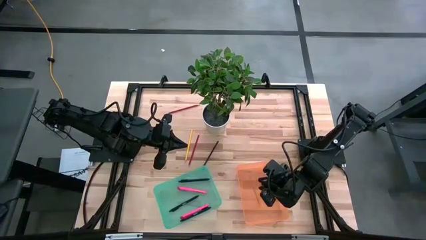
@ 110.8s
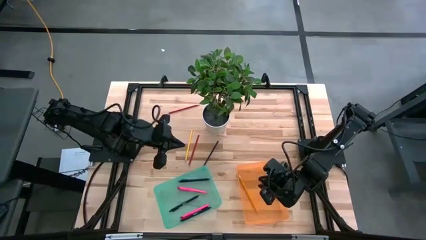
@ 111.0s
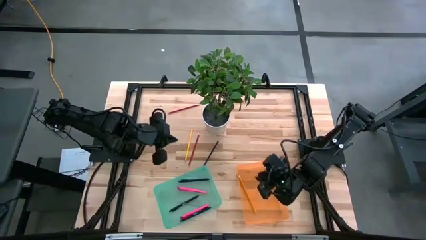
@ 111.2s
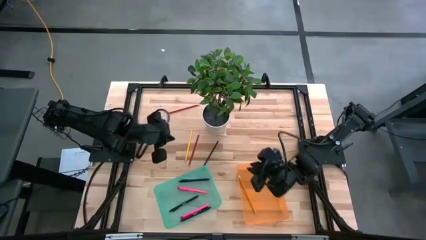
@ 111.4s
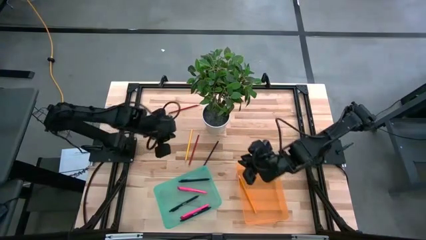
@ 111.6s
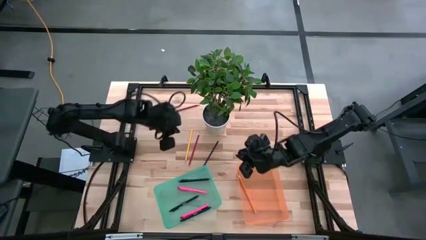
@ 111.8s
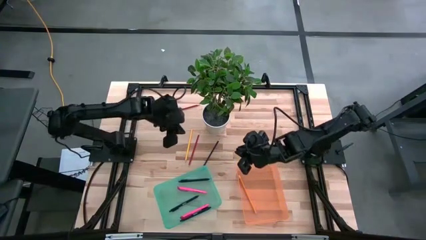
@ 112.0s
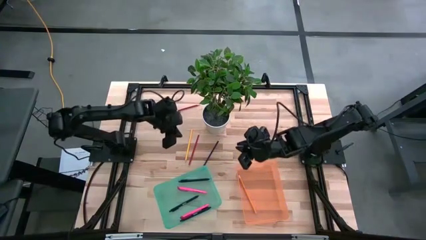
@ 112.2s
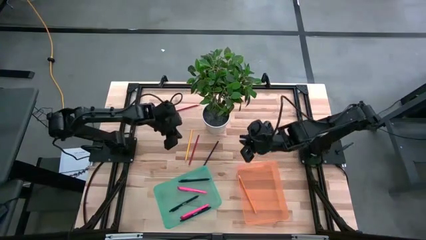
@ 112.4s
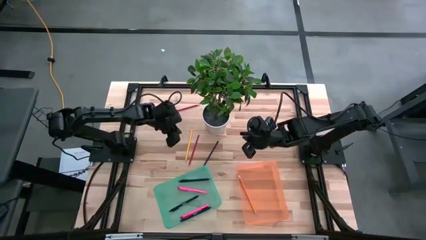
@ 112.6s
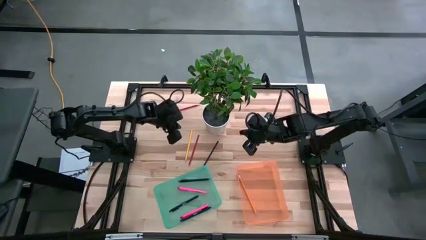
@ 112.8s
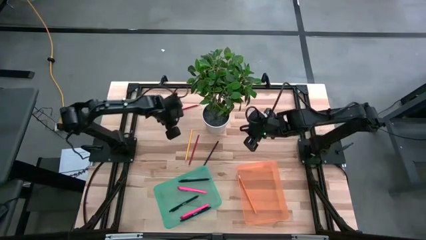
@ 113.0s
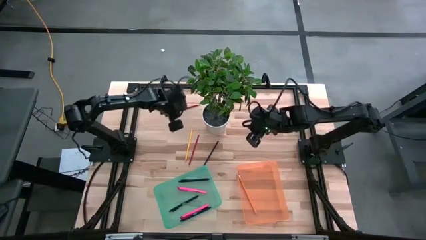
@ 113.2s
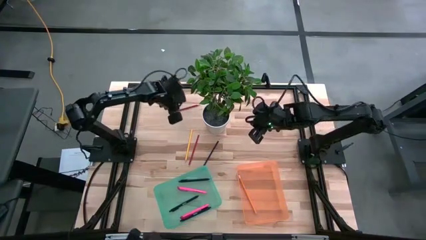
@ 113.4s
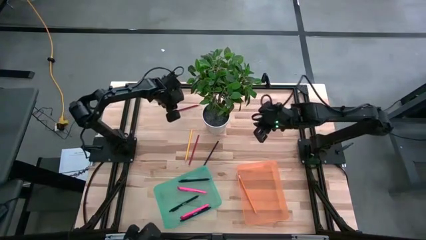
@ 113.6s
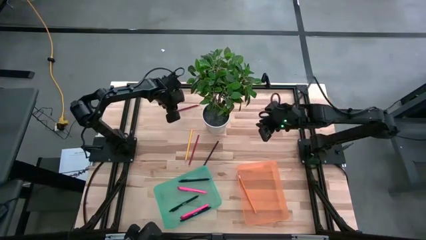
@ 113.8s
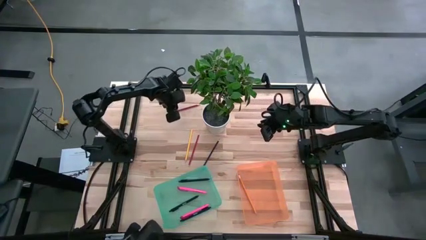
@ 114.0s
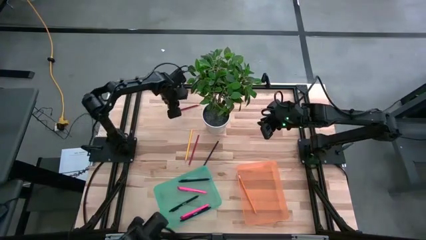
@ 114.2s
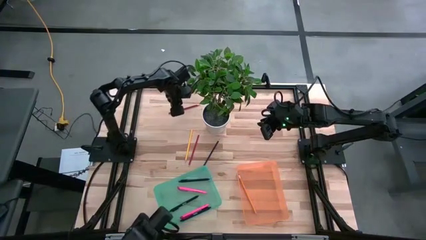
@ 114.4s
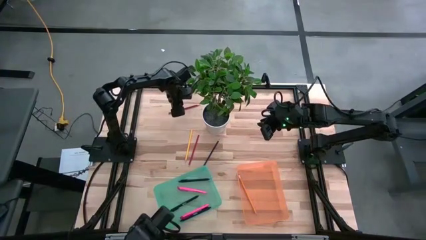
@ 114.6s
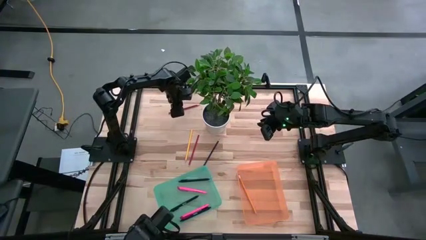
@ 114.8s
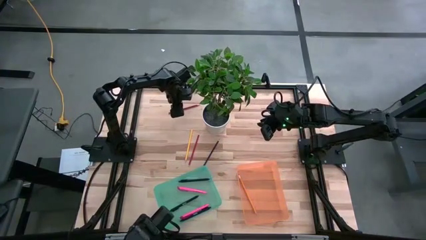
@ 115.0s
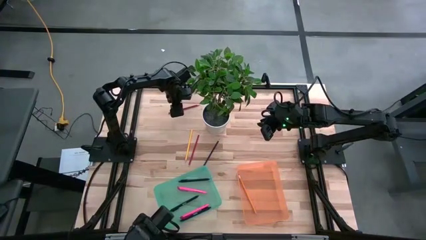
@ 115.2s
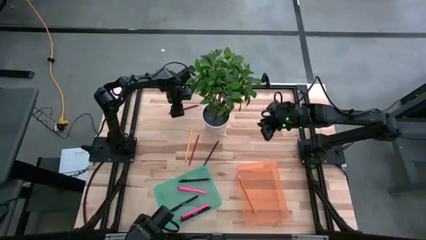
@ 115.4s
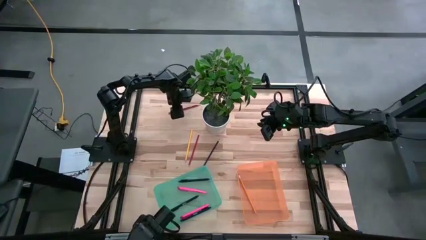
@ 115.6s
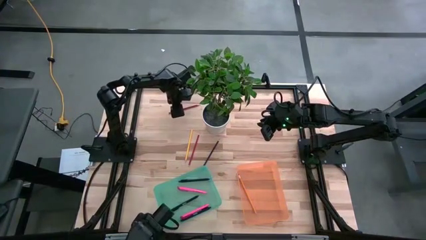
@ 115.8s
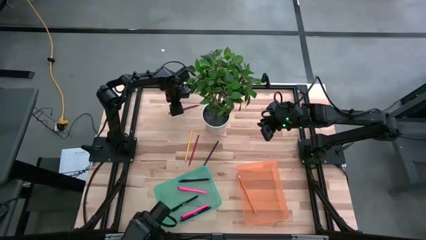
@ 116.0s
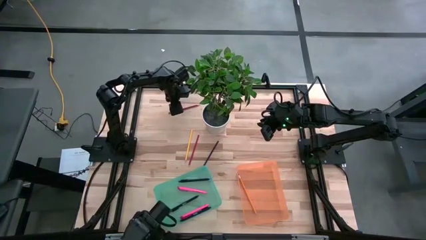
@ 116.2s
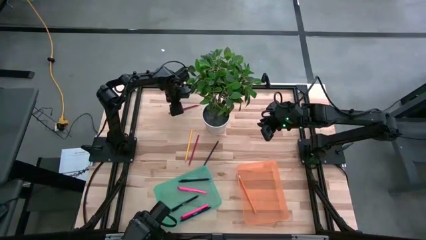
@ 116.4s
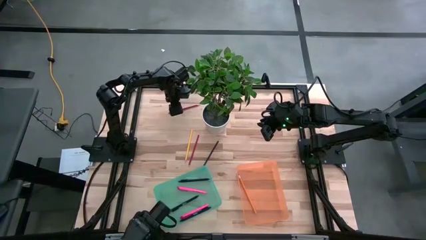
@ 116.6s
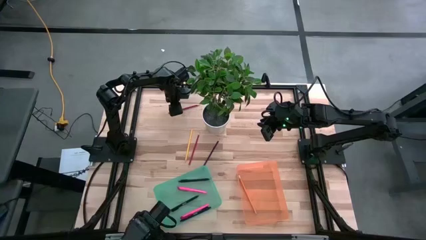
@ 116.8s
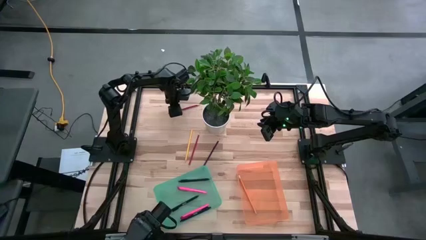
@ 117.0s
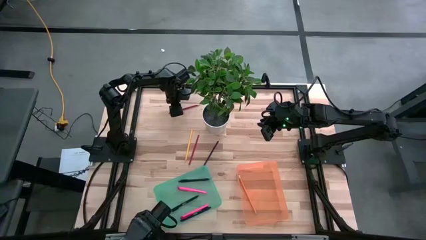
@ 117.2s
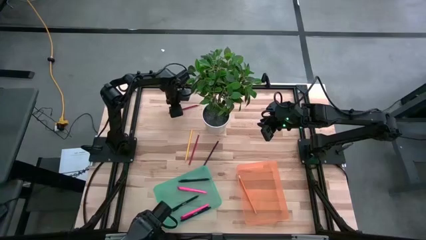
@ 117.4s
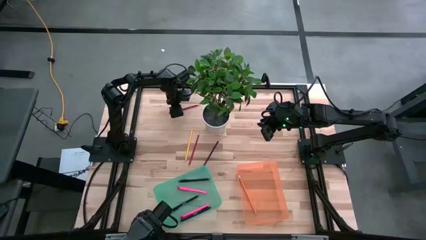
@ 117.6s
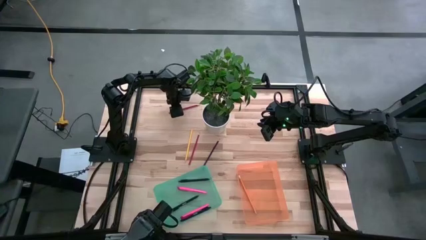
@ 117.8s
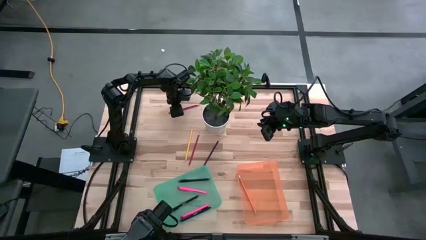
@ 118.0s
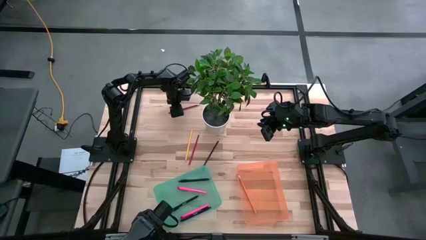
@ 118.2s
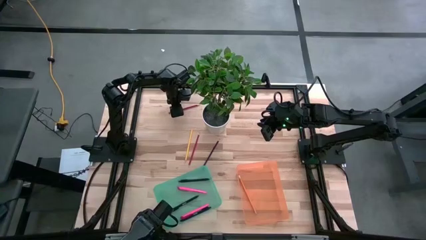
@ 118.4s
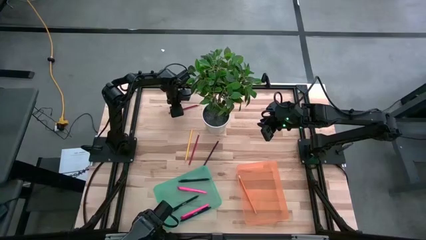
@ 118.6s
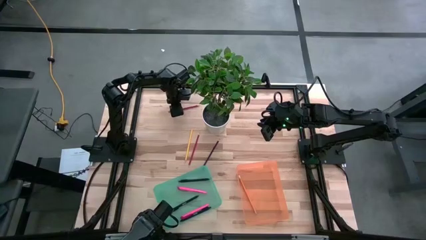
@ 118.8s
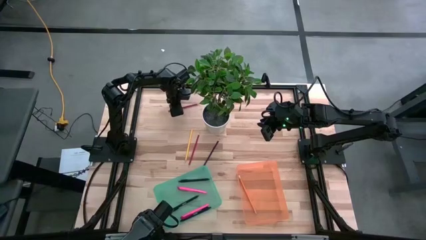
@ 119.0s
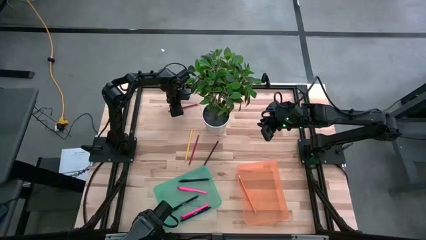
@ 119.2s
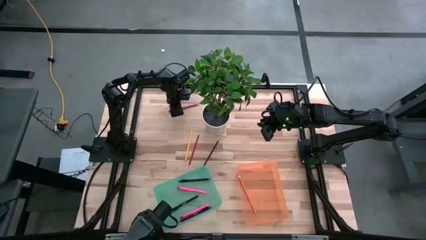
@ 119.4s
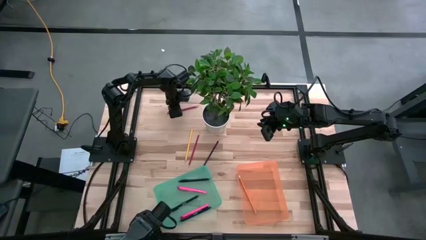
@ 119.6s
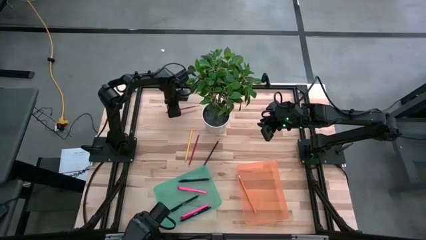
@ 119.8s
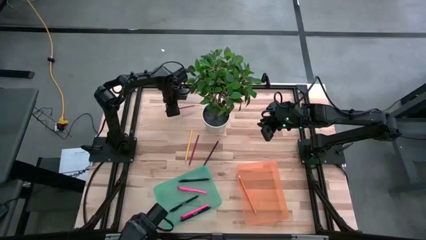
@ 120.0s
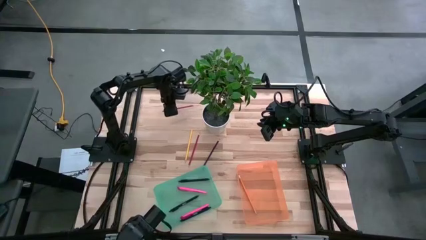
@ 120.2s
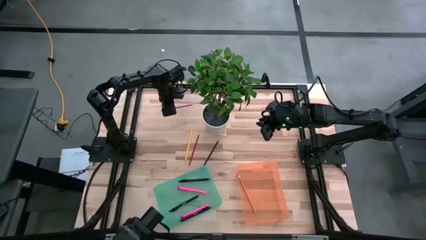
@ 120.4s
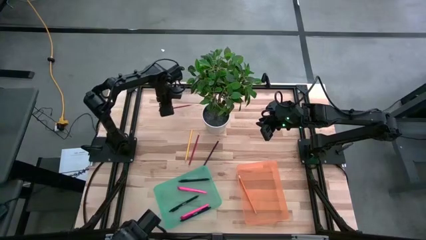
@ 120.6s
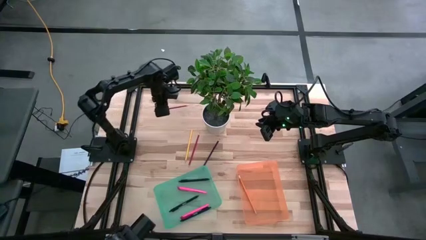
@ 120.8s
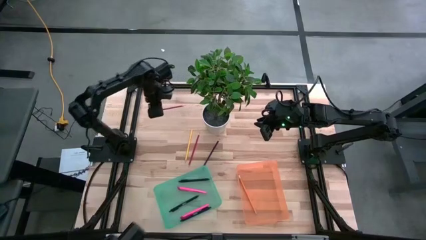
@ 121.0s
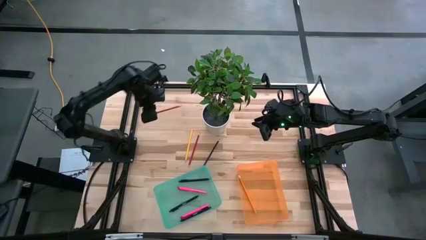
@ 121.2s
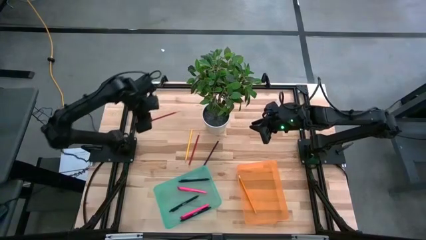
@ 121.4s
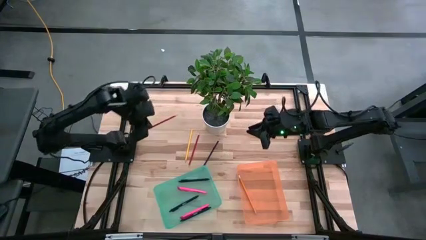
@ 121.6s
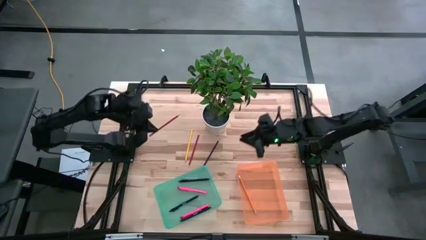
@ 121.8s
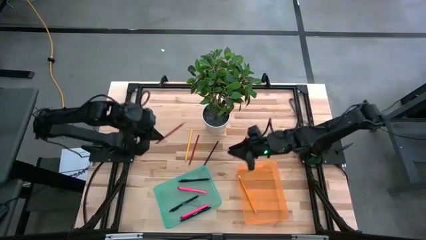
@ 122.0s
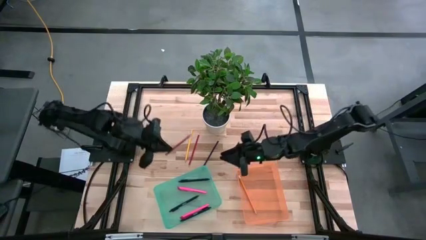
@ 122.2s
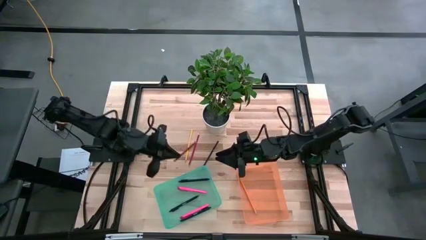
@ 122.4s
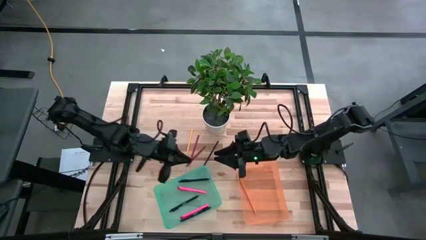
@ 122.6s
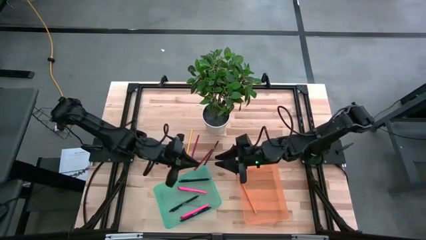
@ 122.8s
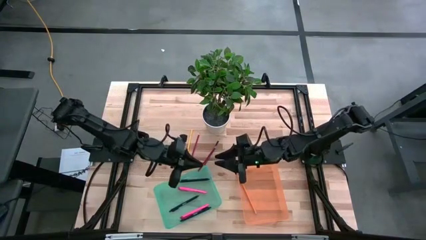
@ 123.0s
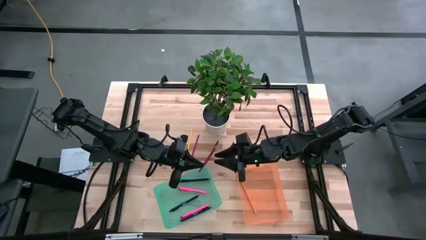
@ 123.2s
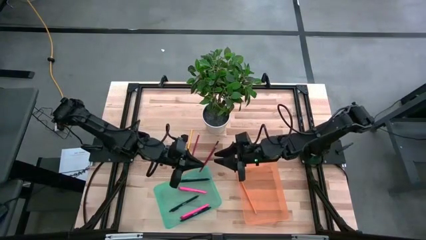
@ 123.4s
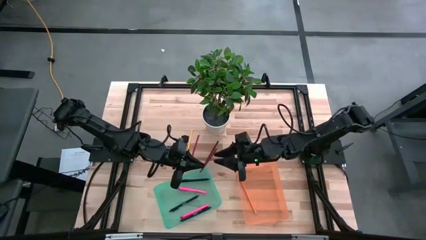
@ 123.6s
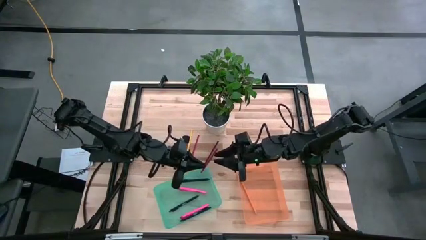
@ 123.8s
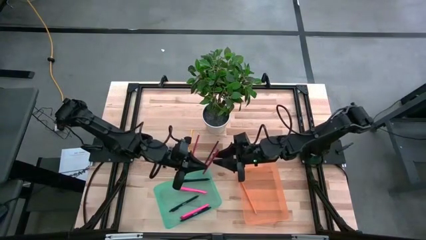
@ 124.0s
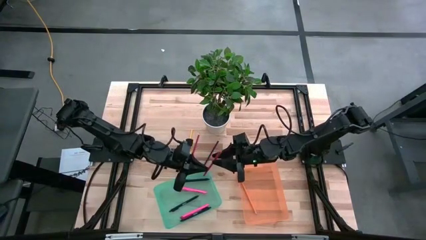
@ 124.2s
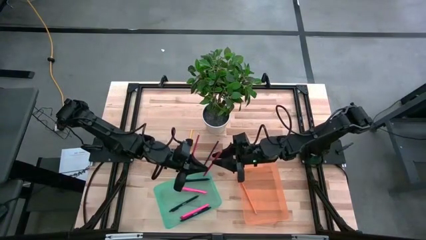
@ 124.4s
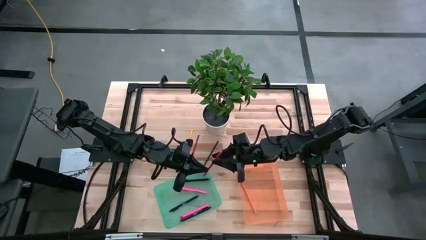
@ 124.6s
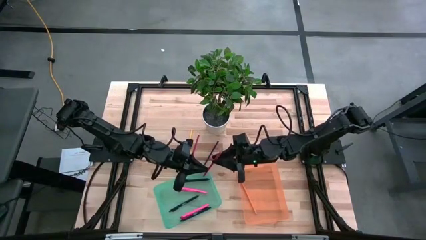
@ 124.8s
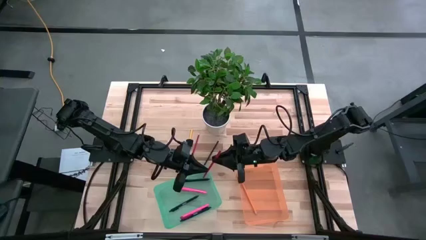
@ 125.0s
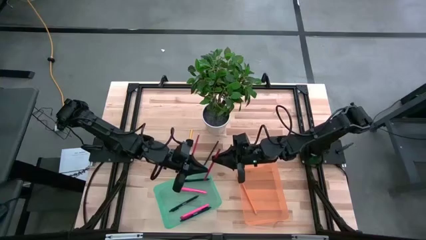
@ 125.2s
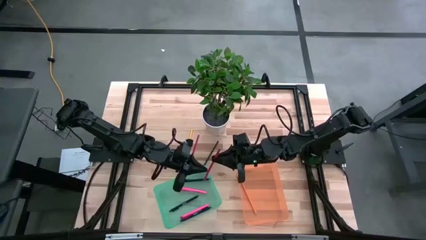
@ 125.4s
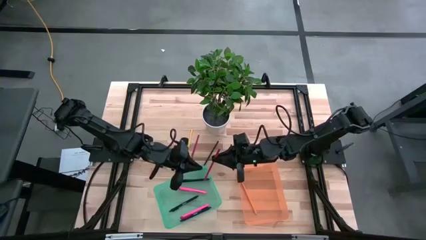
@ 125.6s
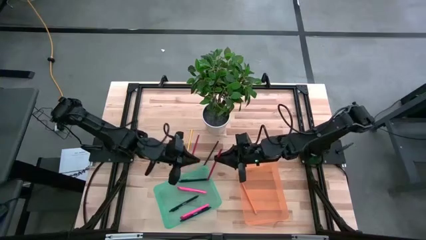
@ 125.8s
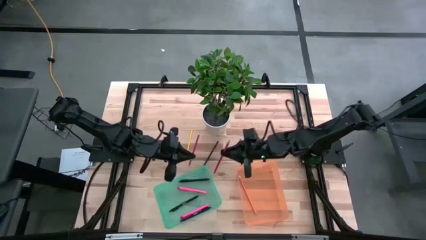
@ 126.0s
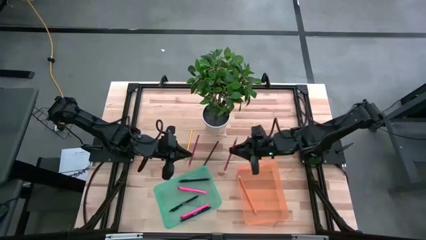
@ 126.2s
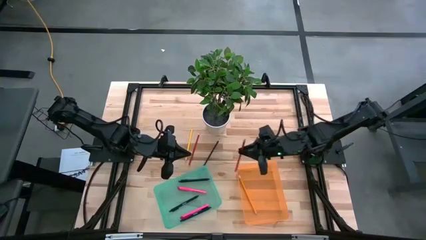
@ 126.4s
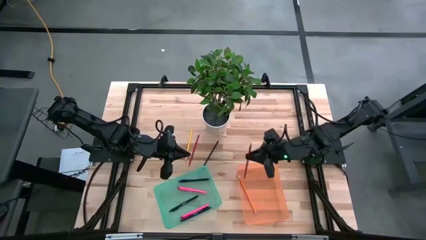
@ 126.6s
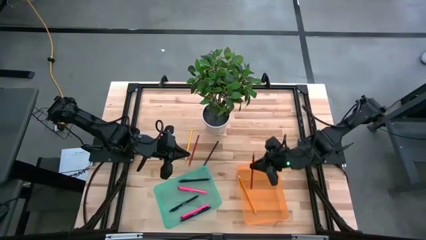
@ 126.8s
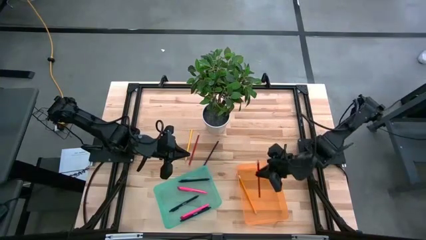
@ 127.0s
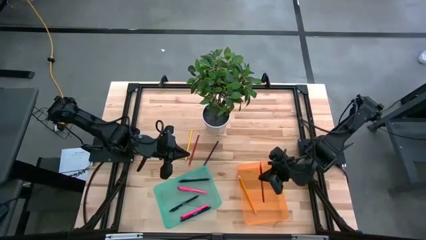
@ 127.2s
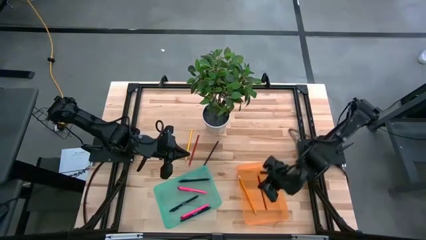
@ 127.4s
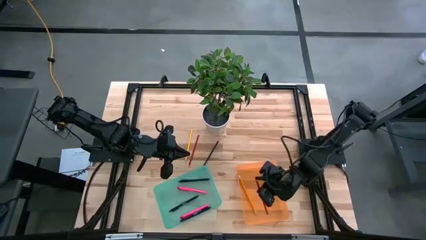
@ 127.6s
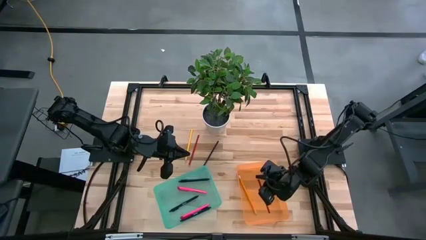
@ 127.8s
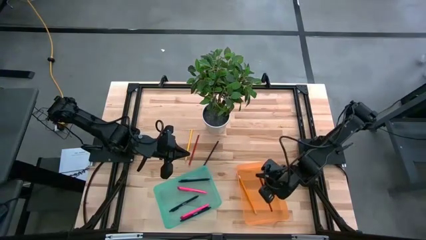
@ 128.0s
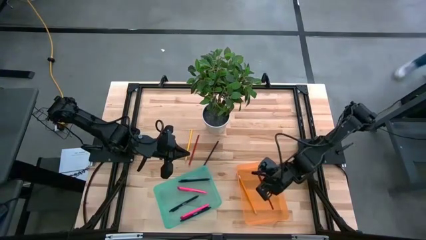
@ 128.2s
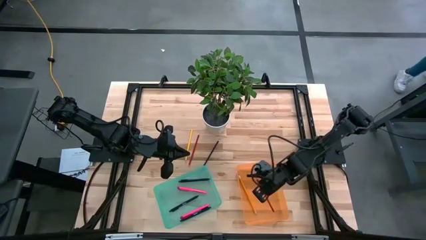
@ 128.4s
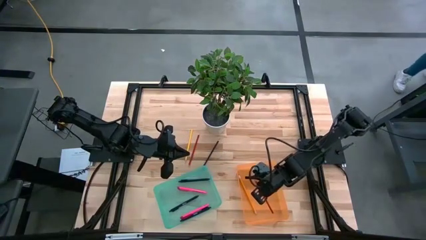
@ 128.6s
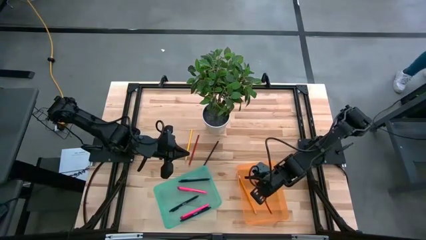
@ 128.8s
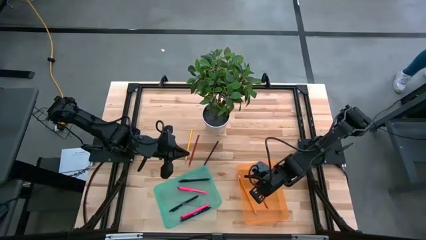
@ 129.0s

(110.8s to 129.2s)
Task: Sort pens & pencils
Put the top red pencil into the orange bin
